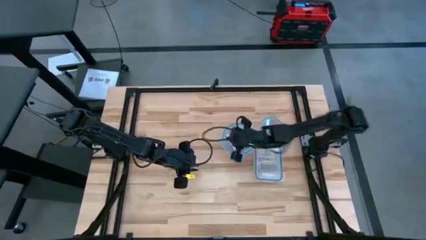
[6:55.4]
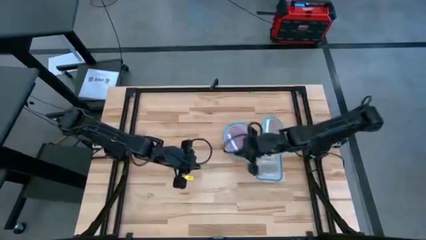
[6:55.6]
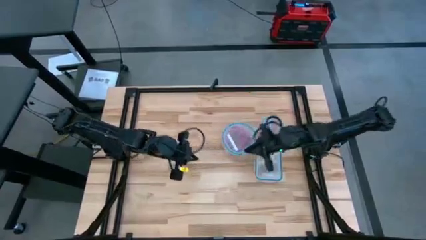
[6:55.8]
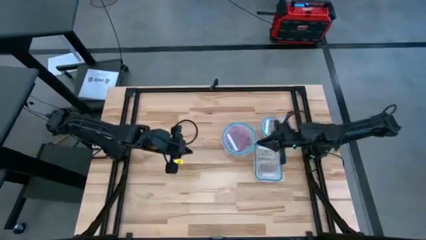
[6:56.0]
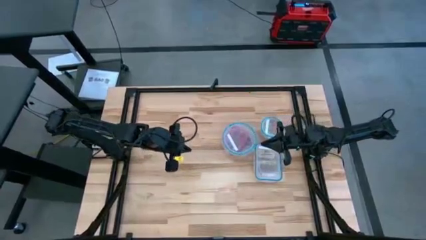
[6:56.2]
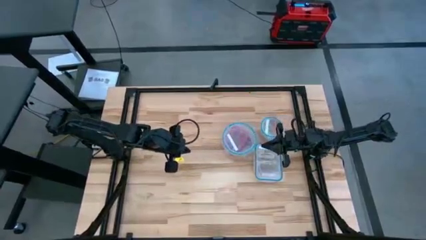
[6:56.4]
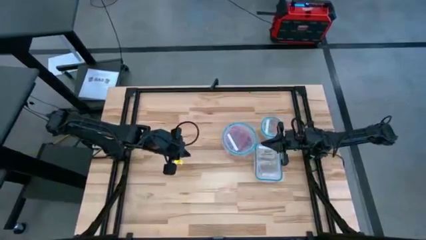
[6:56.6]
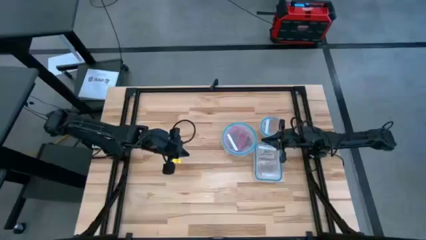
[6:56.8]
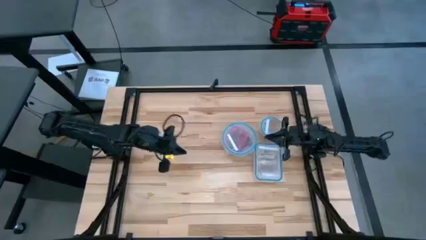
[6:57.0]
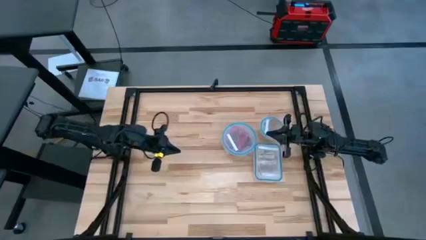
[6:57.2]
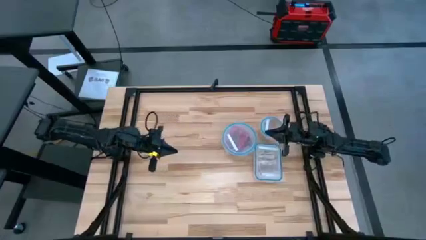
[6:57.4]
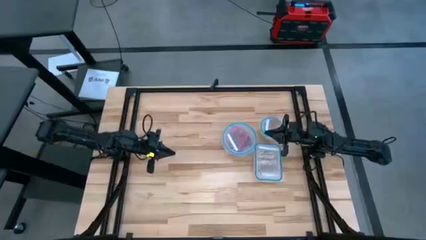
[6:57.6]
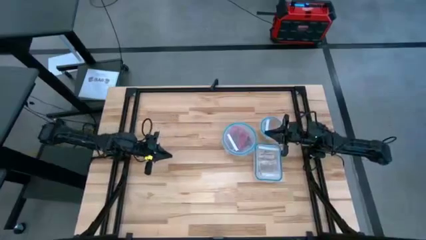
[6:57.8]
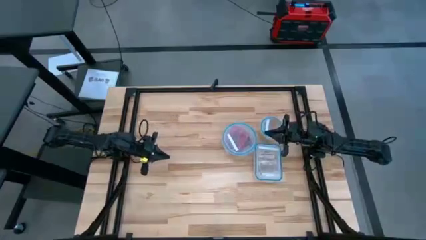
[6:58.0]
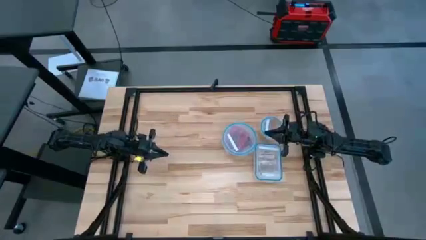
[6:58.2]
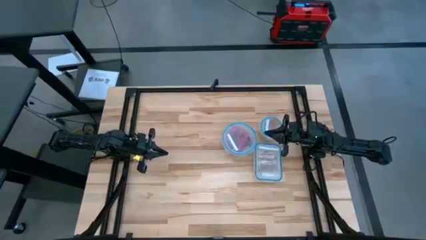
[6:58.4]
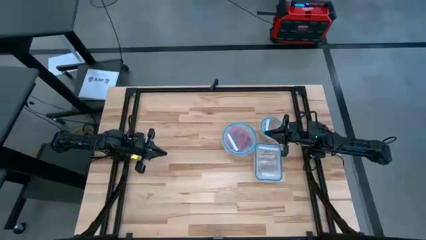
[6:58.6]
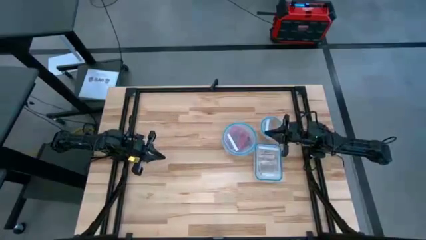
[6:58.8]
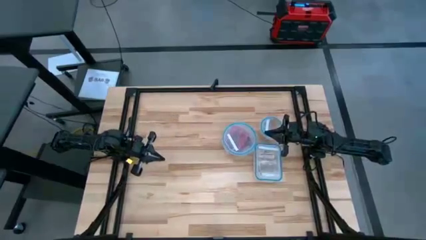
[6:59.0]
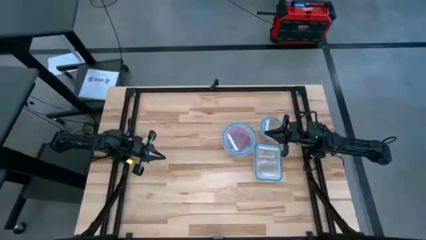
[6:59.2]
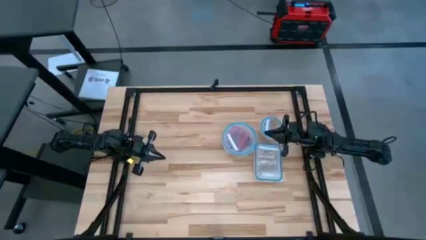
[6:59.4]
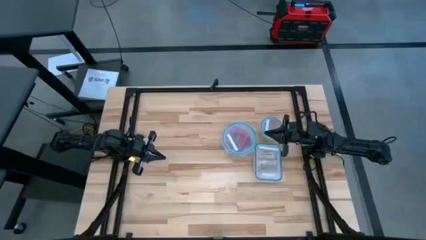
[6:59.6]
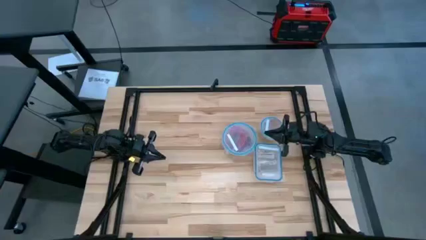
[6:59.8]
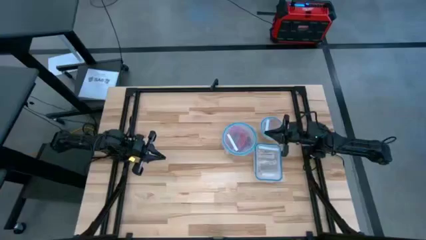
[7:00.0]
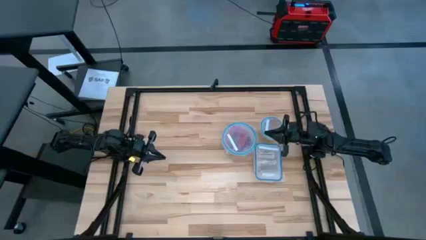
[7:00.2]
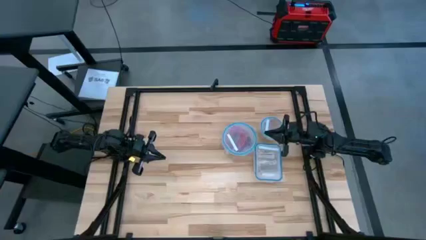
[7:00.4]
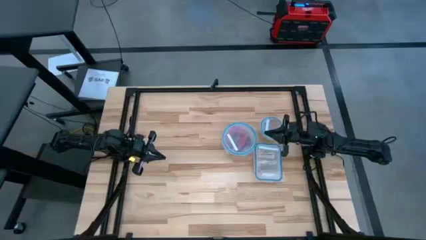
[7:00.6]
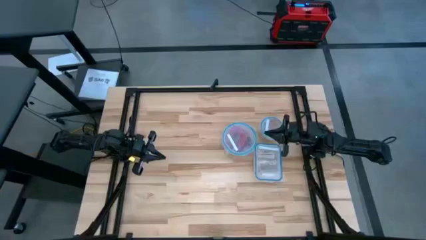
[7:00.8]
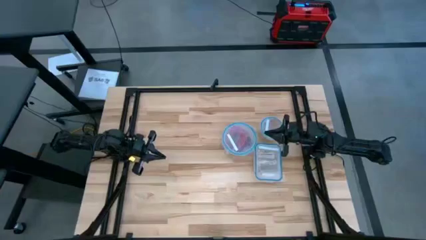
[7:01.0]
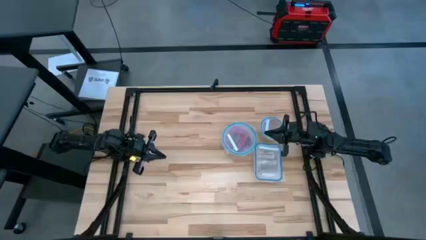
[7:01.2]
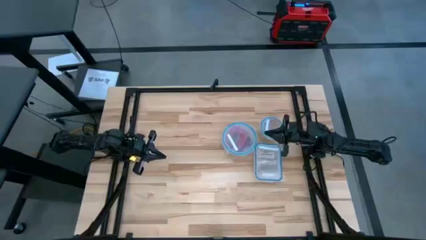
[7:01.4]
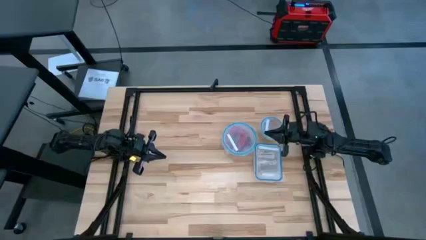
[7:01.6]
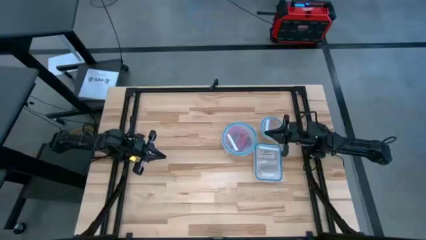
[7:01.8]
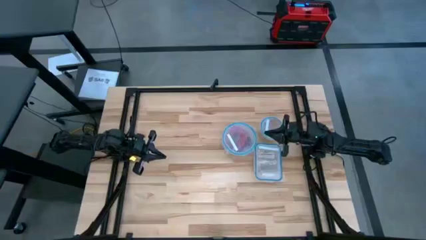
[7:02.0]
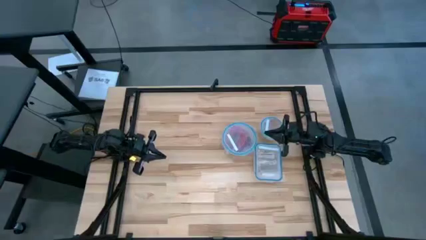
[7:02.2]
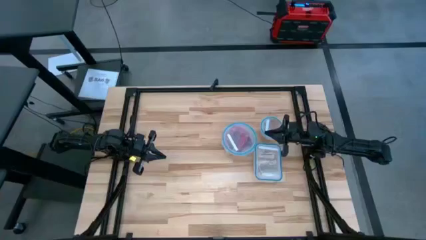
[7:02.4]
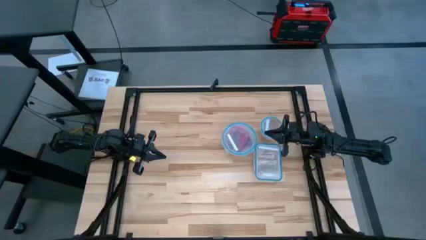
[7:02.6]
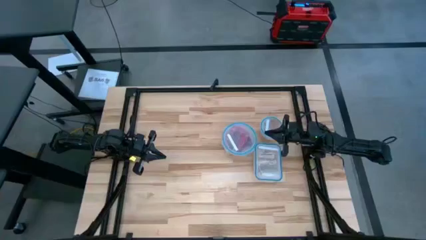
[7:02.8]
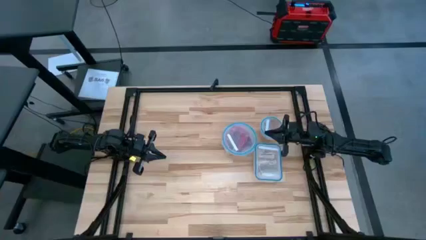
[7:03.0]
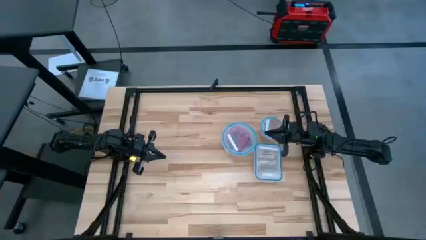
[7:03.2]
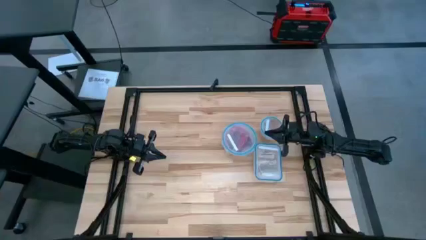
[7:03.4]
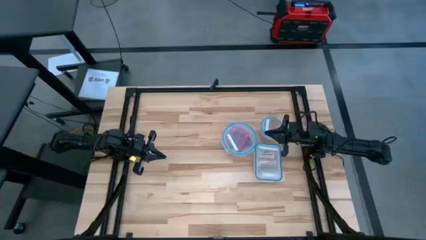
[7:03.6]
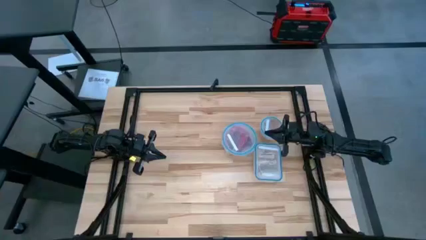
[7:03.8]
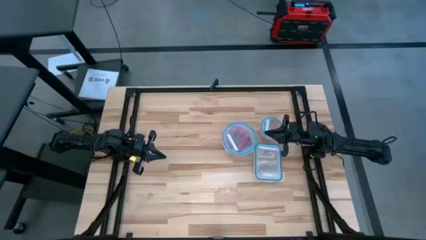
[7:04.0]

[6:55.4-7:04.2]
Task: Sort candy
Return to Home Position
